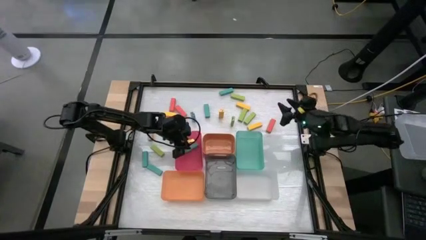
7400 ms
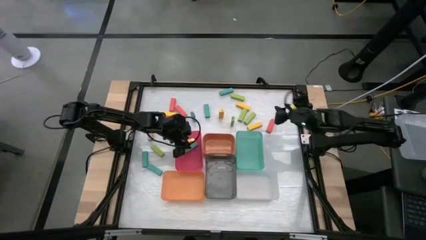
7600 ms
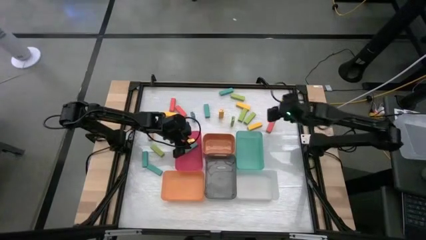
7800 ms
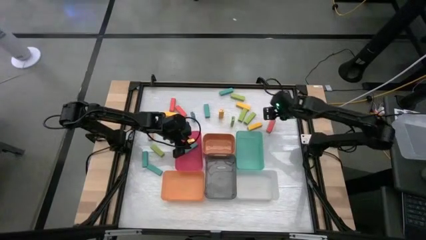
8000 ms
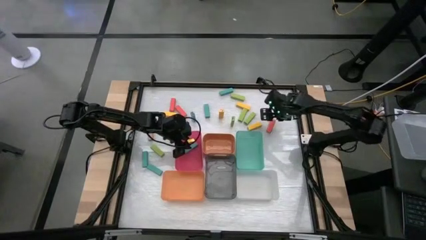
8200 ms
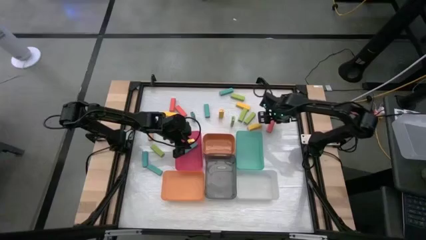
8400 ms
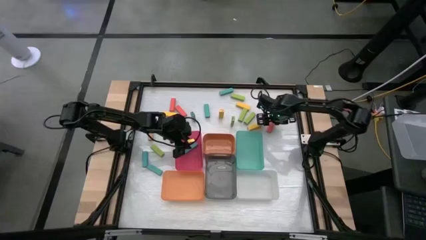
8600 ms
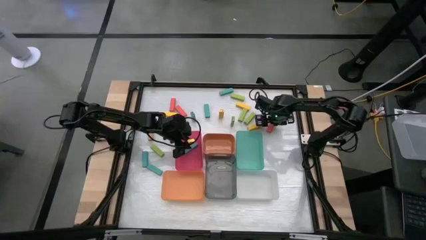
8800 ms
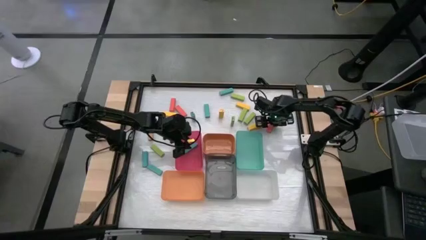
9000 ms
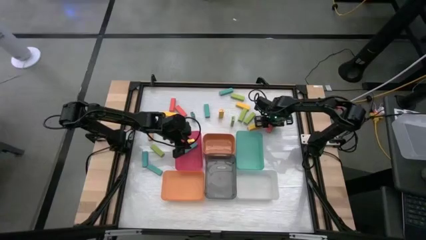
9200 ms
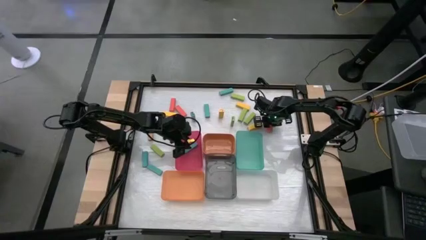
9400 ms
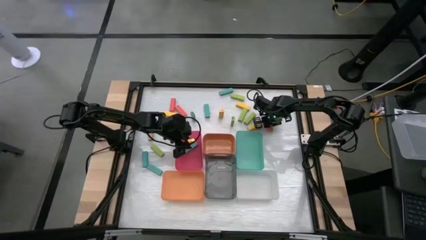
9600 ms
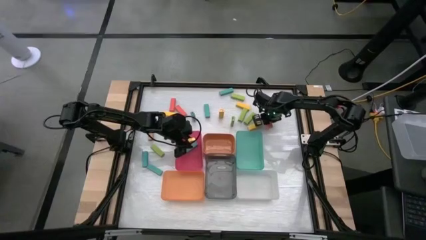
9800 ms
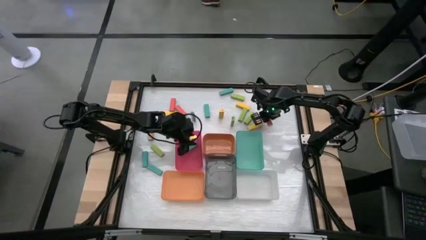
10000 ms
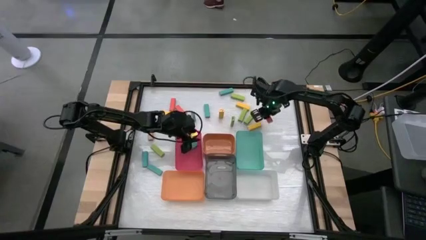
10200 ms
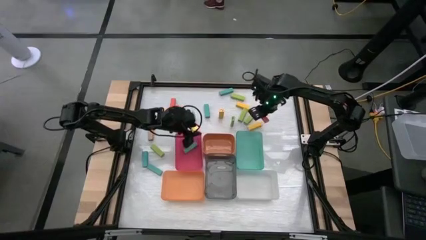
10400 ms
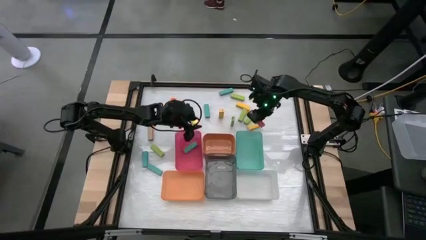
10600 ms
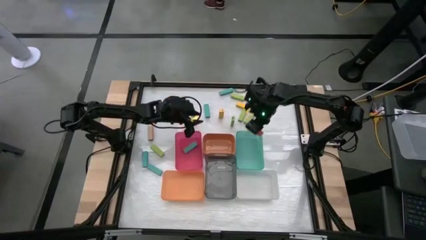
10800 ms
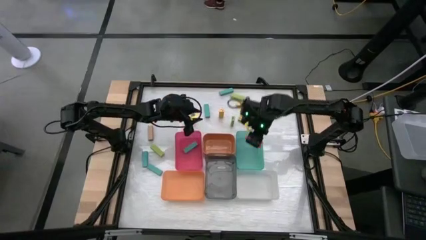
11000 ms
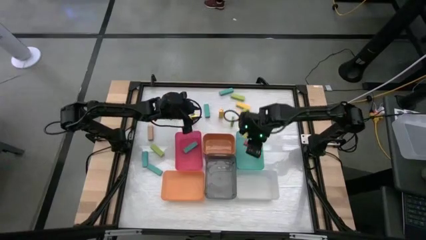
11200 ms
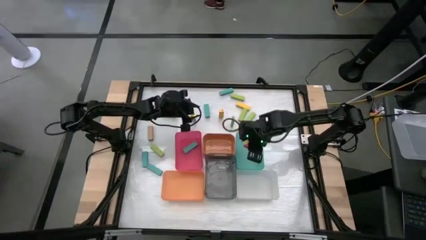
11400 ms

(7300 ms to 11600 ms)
Task: Sort blocks
Put the orange block into the green bin

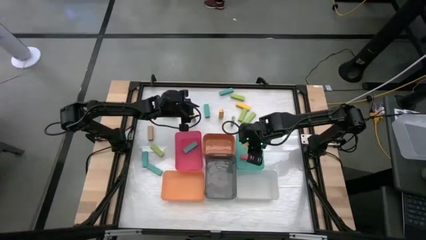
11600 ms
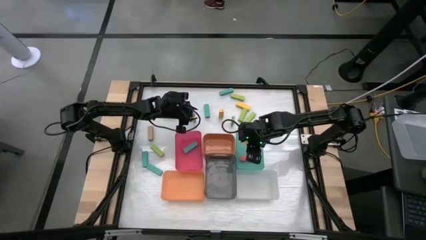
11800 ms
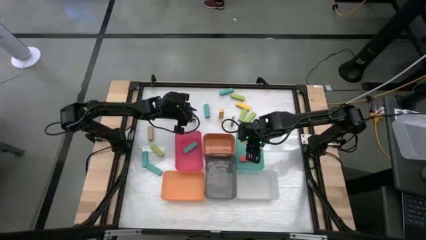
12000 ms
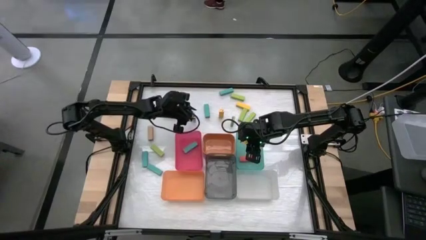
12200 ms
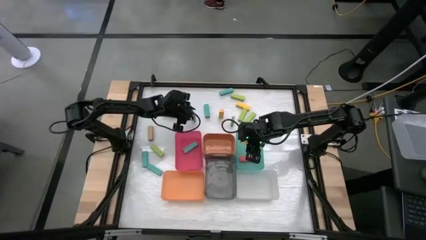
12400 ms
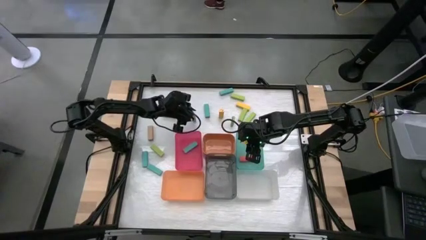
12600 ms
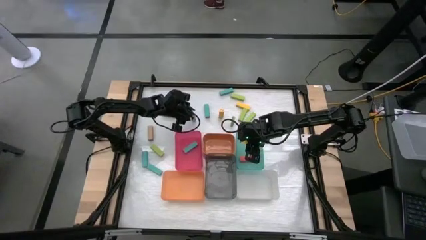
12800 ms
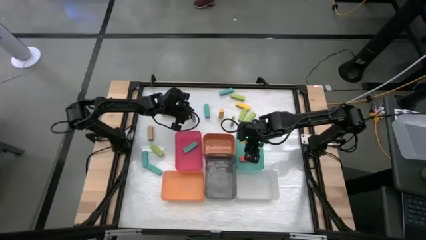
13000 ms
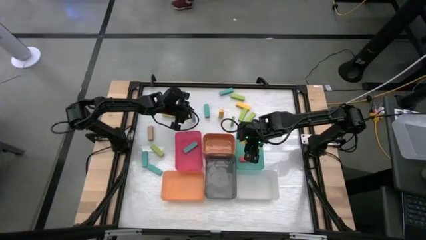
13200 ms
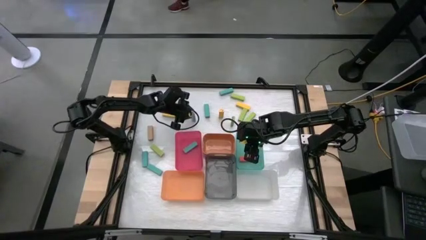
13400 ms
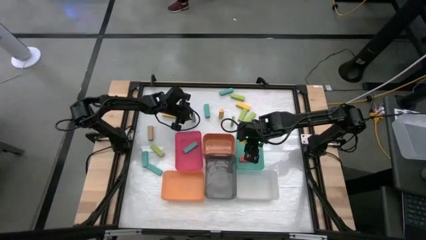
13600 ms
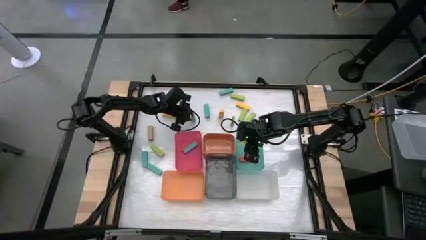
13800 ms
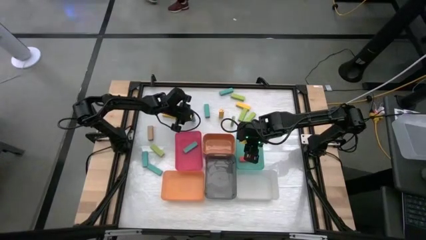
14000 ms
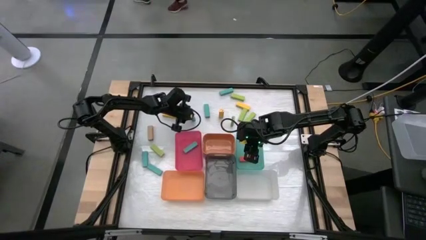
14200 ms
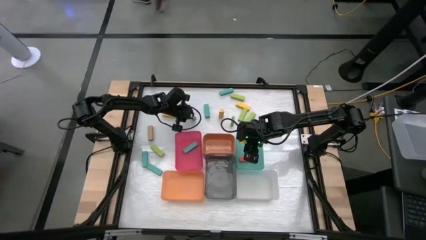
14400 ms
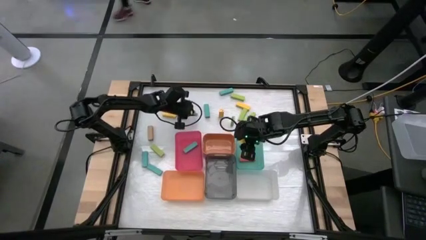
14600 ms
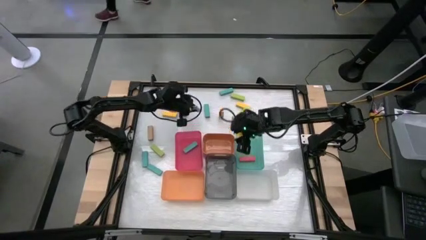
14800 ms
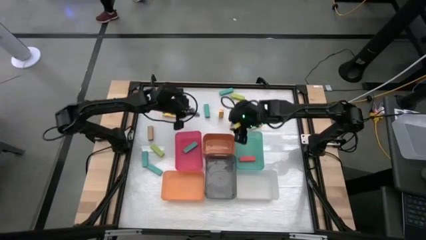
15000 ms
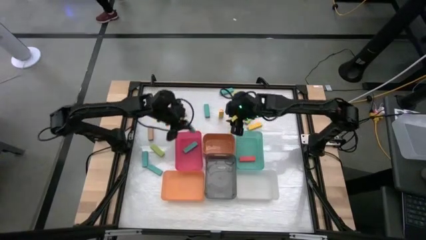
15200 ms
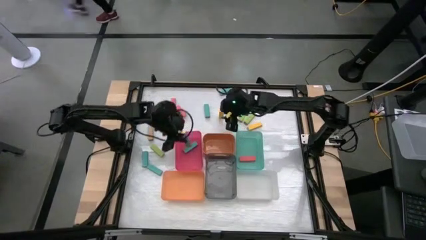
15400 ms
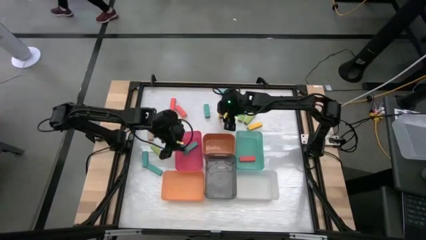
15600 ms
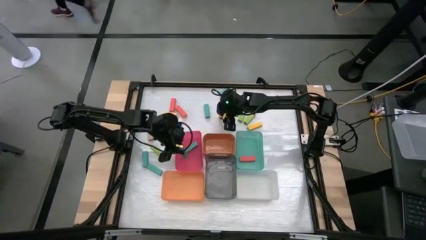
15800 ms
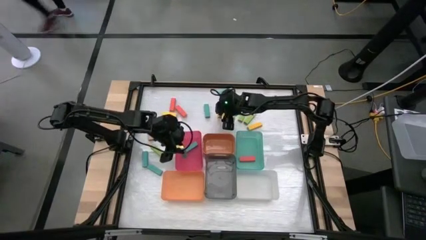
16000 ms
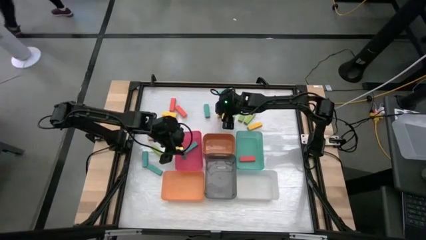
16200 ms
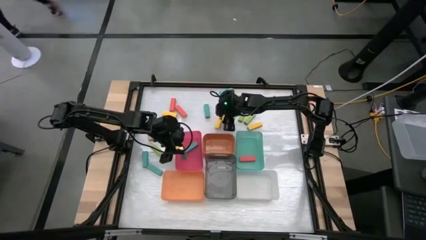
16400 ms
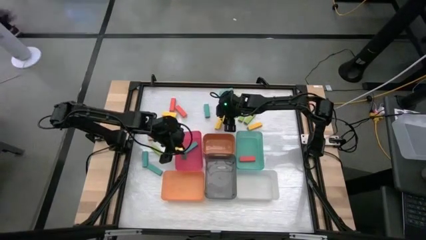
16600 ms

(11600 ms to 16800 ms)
Put the blue block into the pink bin

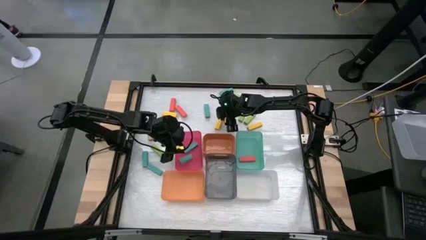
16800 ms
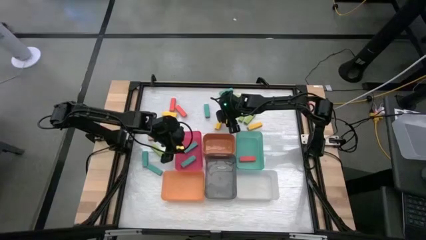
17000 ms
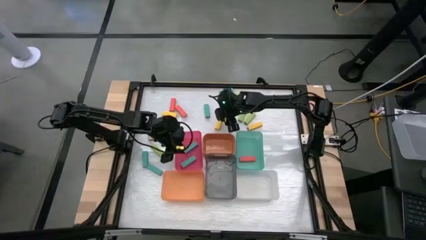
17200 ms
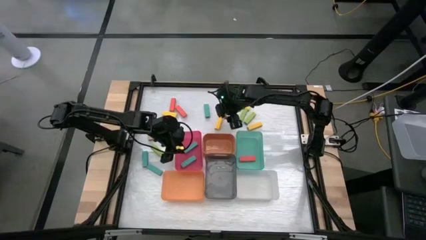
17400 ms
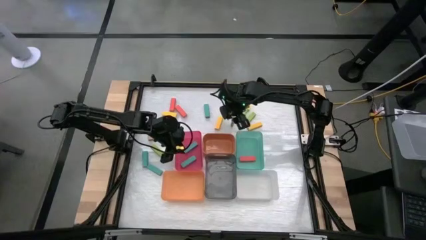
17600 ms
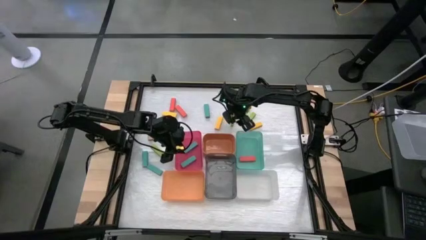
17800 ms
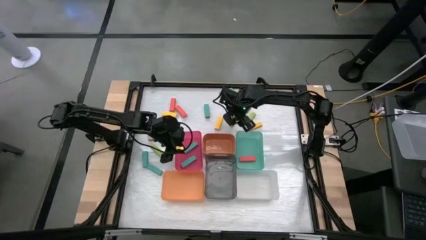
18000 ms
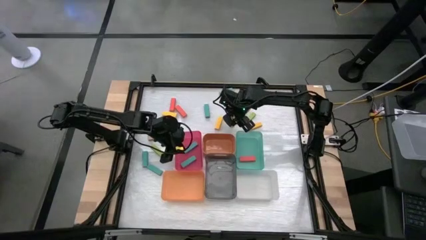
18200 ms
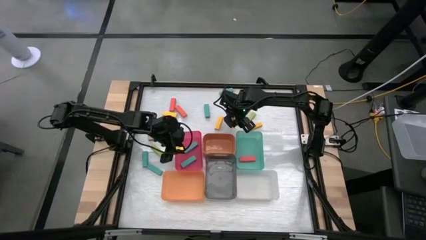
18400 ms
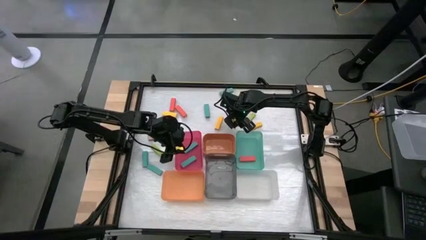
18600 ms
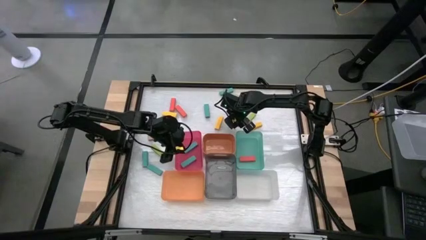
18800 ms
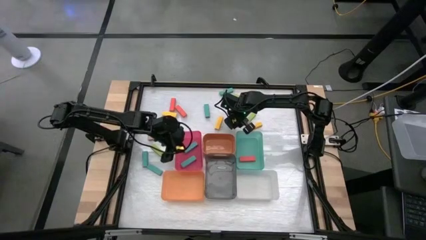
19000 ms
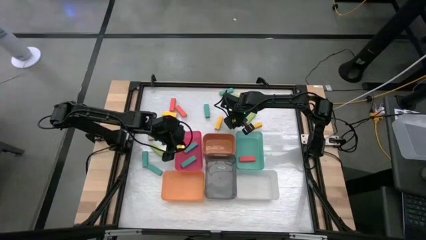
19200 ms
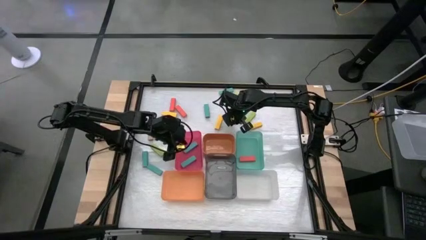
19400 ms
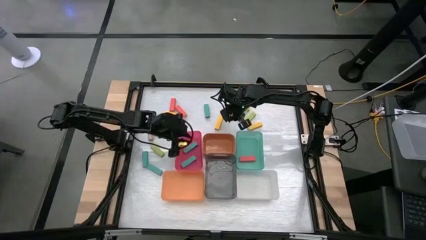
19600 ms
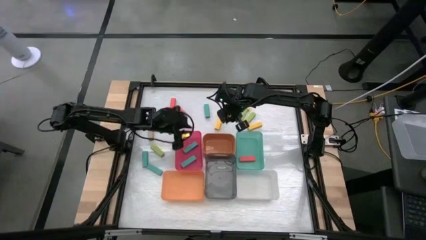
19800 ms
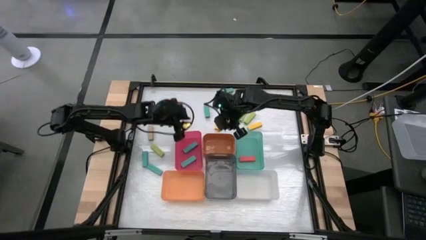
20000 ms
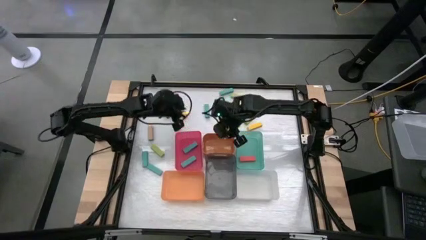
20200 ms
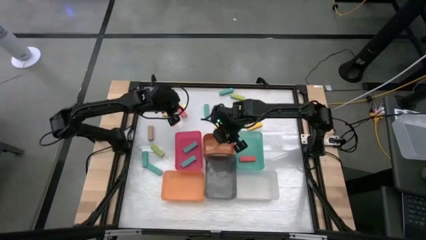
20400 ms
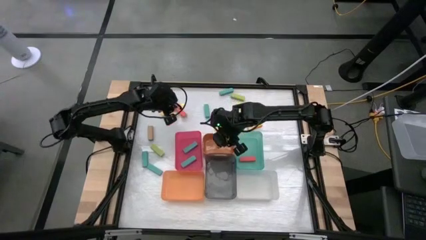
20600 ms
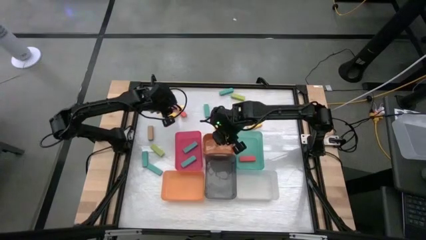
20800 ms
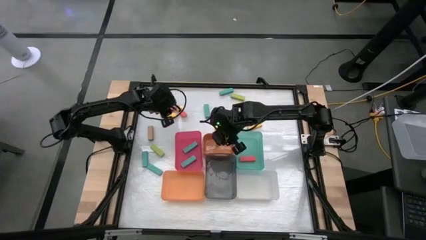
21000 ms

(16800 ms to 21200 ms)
Put the green block into the top orange bin

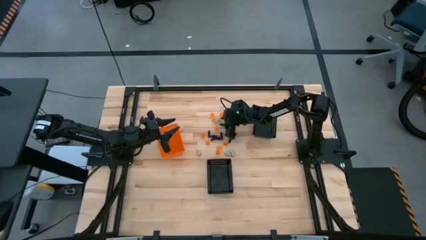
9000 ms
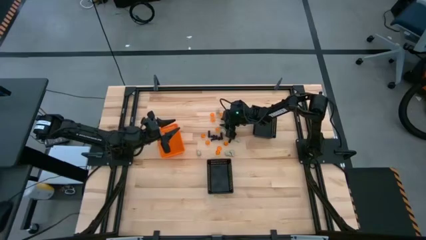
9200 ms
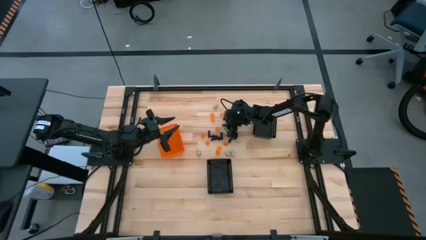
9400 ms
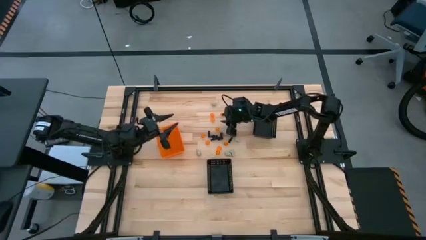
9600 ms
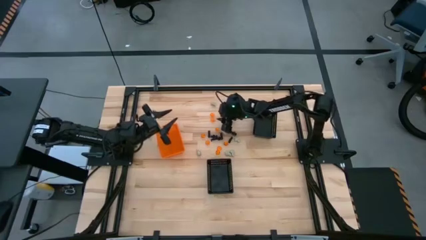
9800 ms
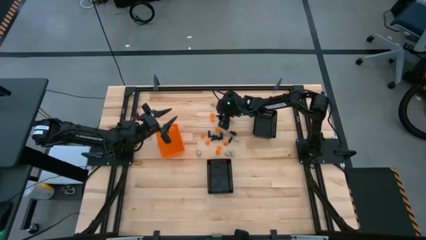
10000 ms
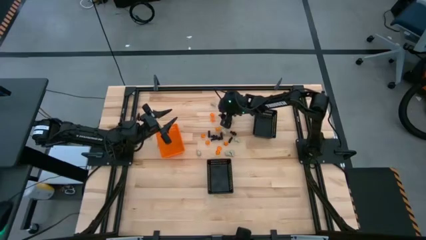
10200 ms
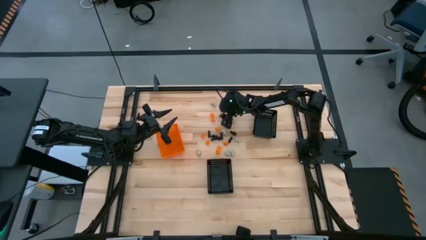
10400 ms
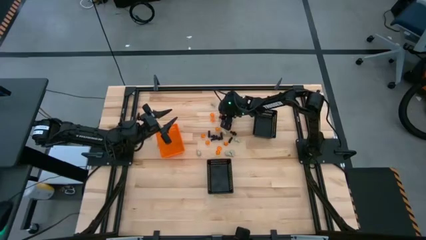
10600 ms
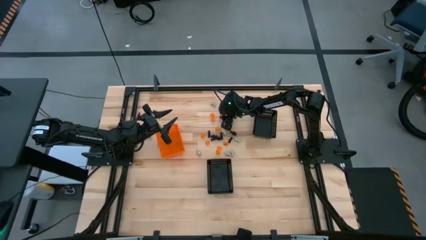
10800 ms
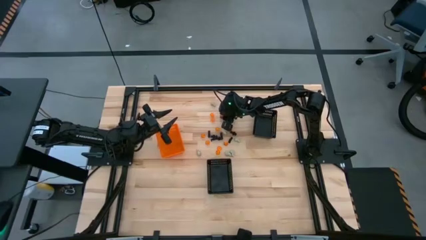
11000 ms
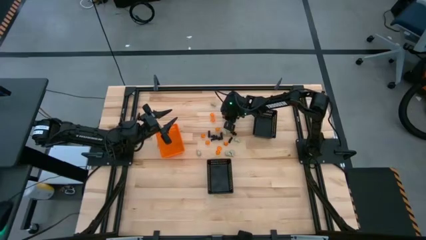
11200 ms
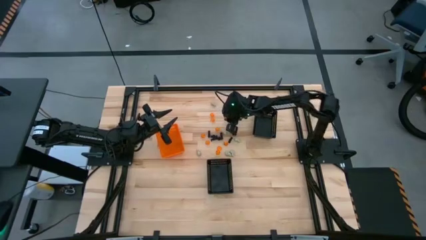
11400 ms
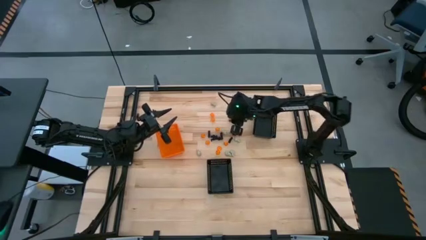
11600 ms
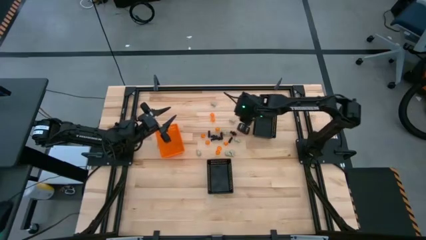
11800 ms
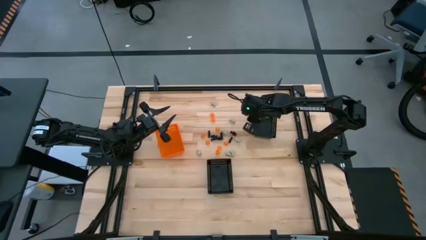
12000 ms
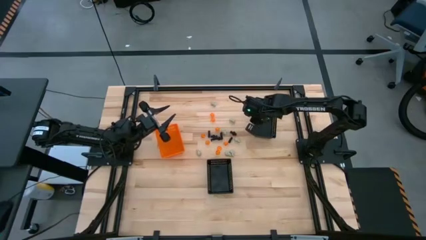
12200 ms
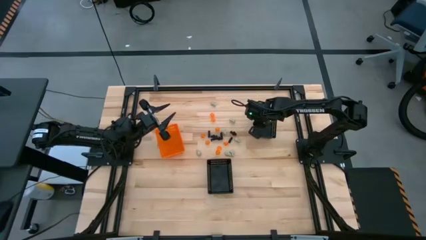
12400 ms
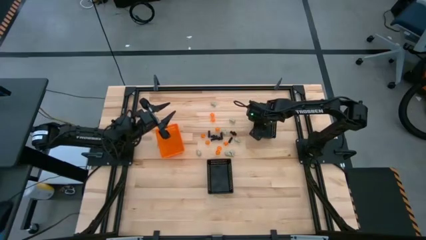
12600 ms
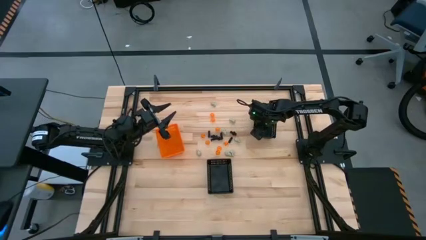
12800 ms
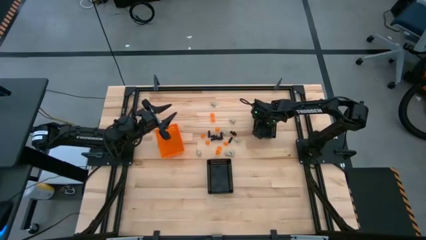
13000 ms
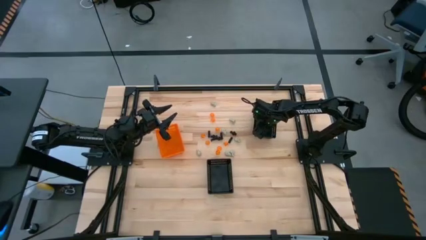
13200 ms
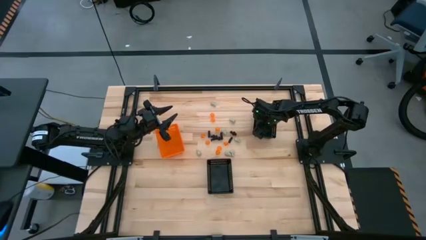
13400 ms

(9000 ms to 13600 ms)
Task: Sort Halloween decoration
Put the orange pumpkin toy into the top black bin
